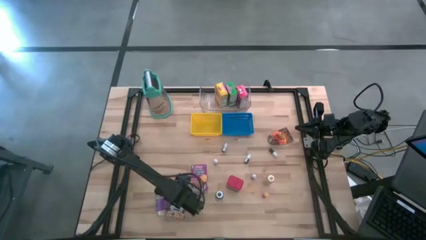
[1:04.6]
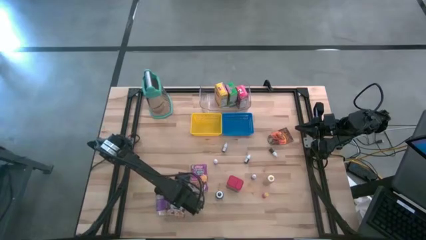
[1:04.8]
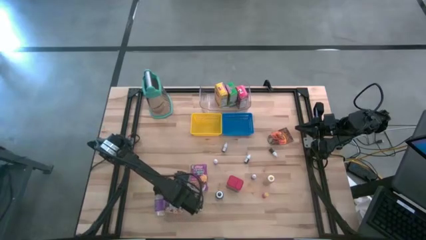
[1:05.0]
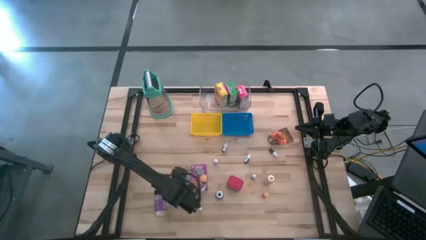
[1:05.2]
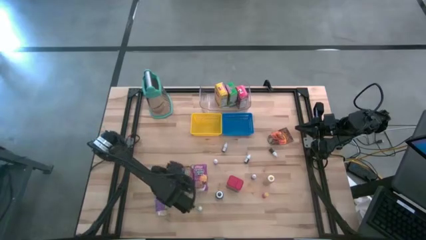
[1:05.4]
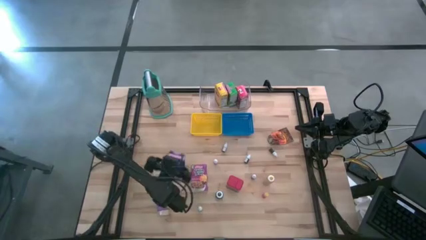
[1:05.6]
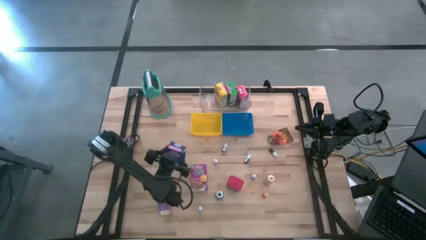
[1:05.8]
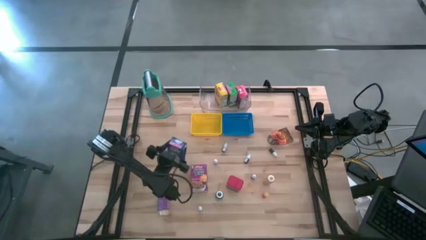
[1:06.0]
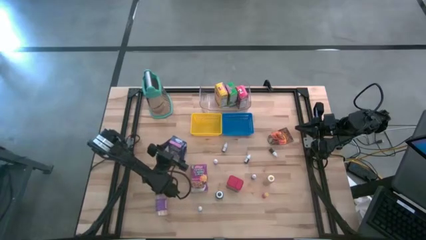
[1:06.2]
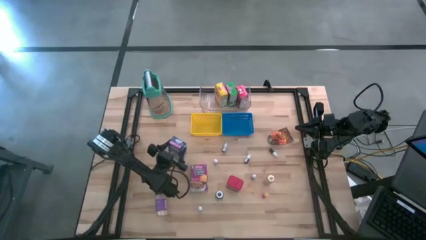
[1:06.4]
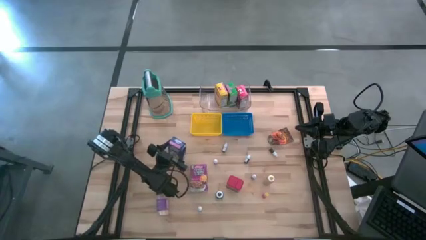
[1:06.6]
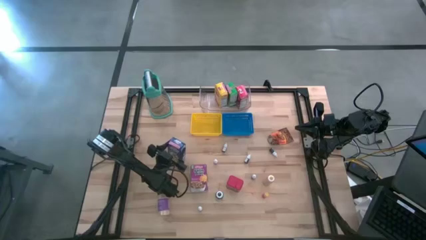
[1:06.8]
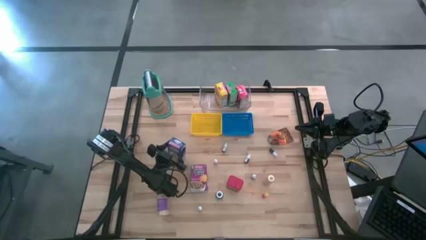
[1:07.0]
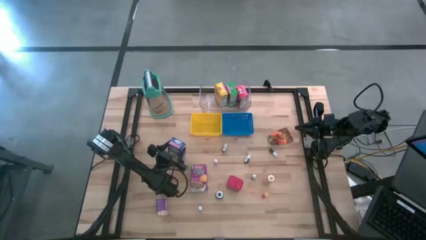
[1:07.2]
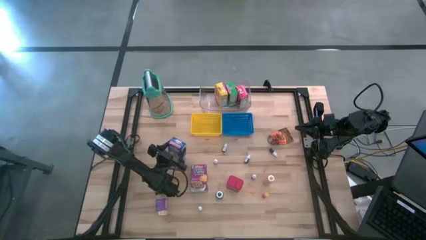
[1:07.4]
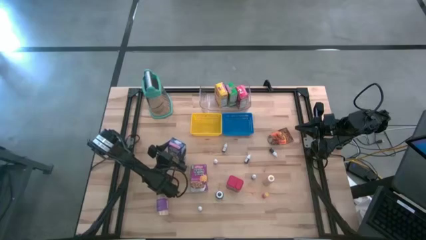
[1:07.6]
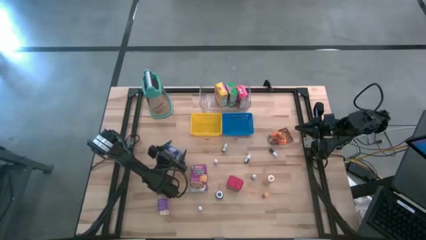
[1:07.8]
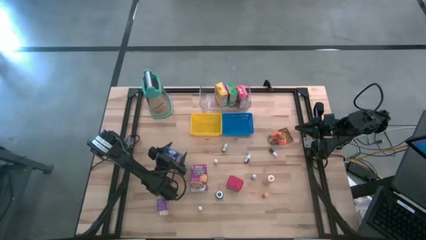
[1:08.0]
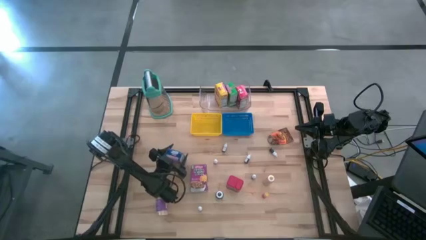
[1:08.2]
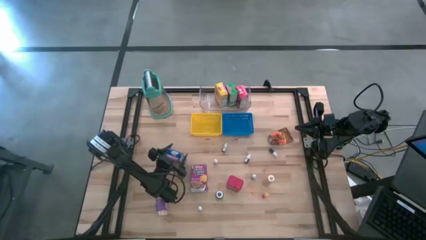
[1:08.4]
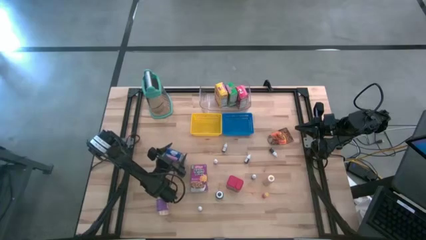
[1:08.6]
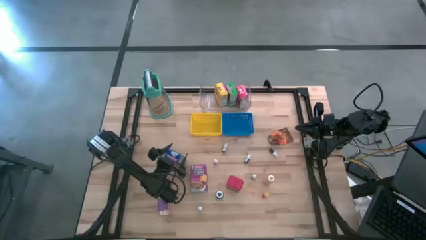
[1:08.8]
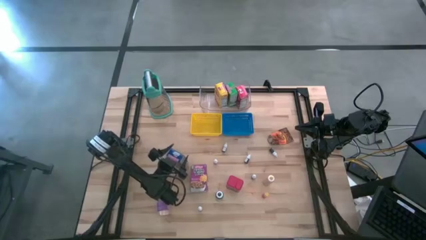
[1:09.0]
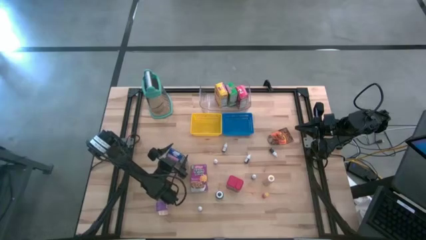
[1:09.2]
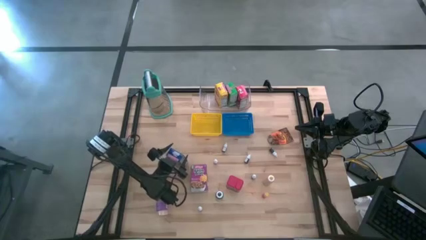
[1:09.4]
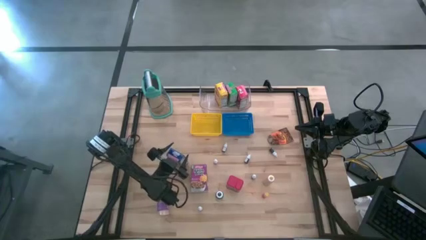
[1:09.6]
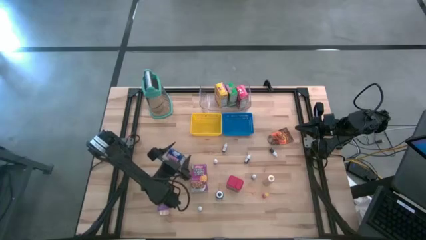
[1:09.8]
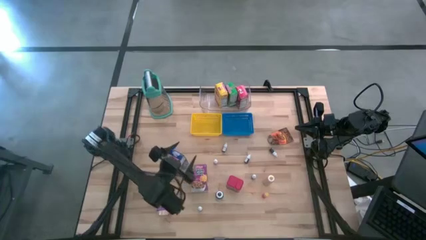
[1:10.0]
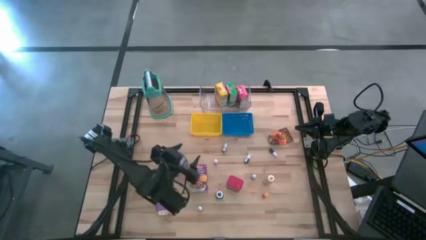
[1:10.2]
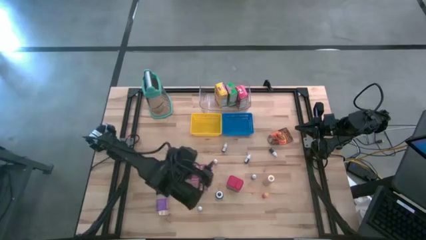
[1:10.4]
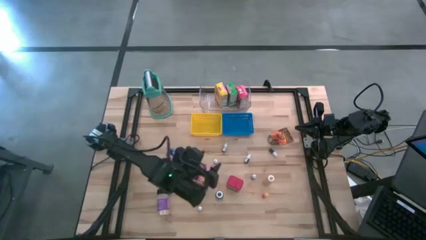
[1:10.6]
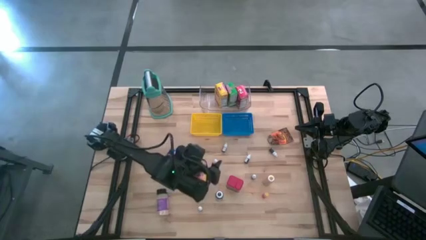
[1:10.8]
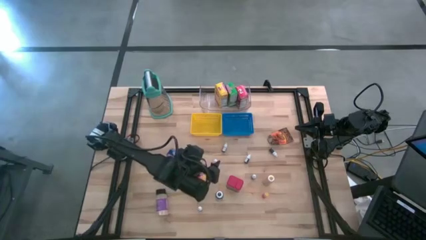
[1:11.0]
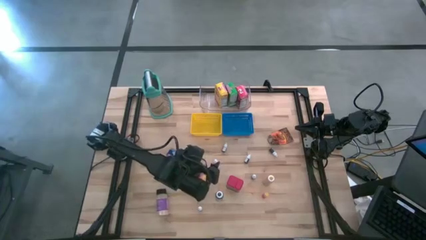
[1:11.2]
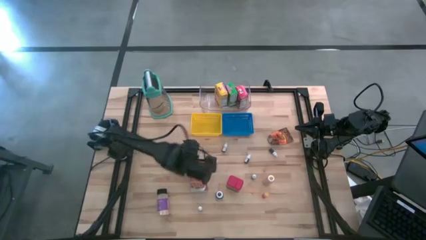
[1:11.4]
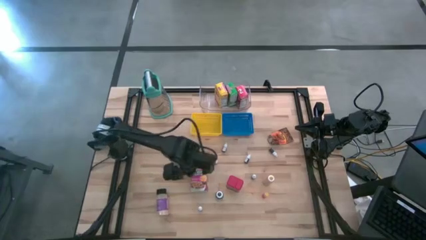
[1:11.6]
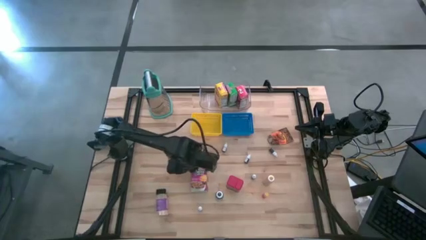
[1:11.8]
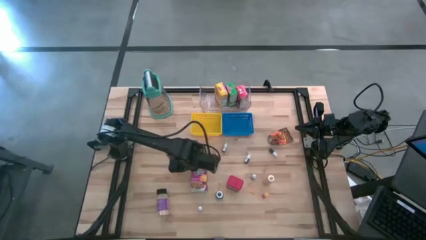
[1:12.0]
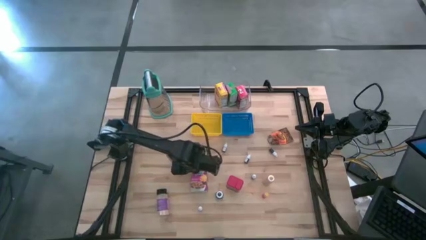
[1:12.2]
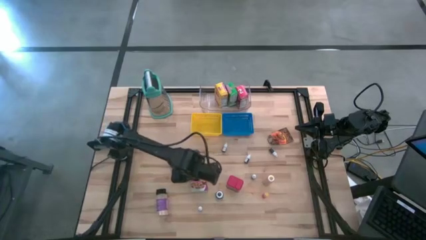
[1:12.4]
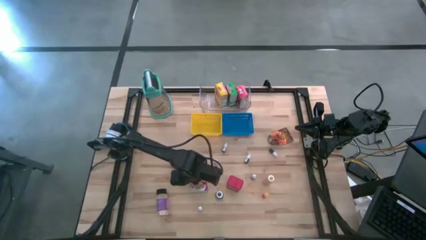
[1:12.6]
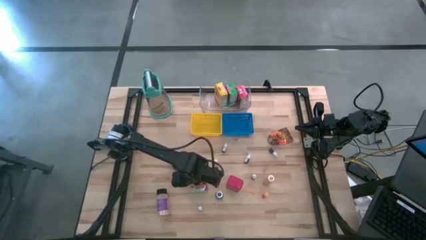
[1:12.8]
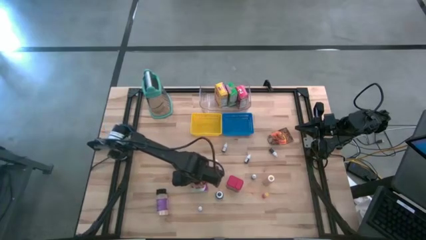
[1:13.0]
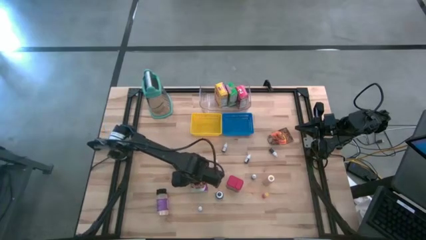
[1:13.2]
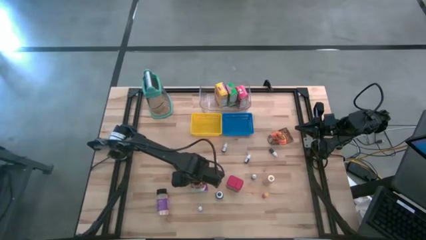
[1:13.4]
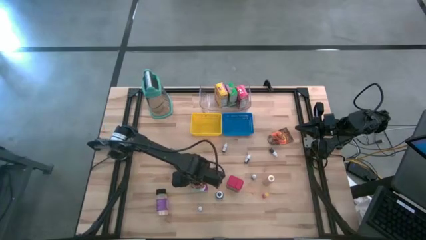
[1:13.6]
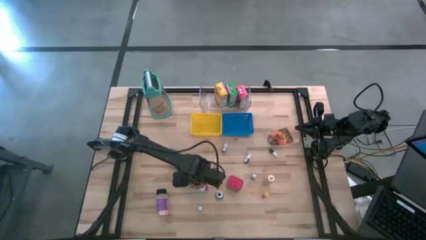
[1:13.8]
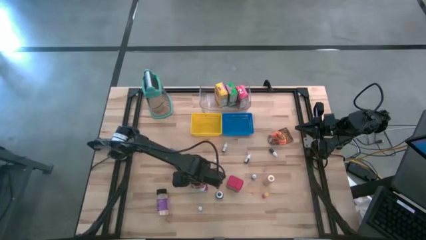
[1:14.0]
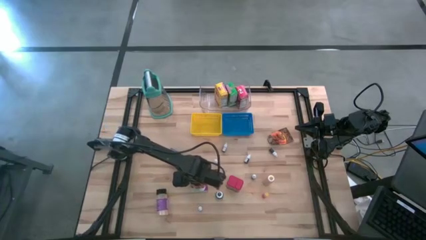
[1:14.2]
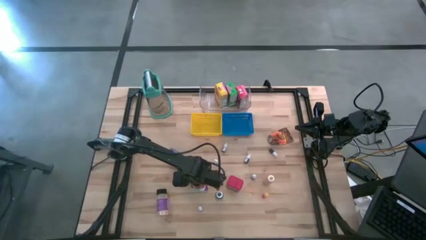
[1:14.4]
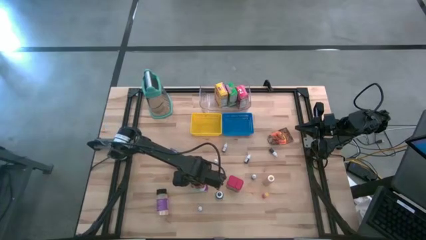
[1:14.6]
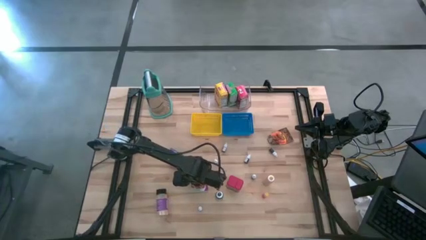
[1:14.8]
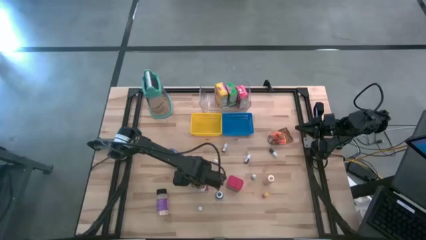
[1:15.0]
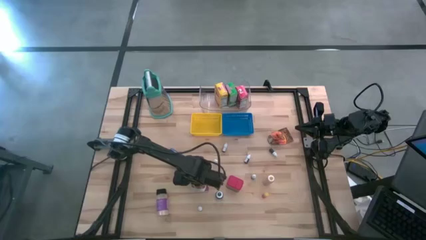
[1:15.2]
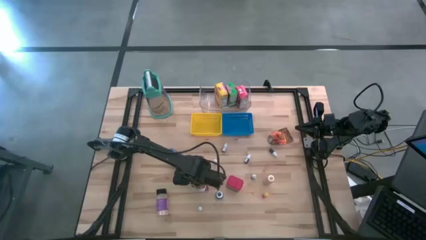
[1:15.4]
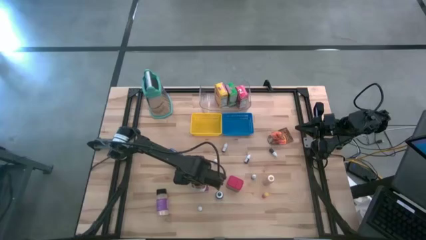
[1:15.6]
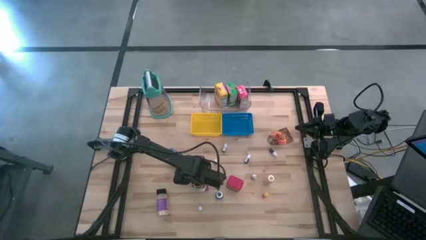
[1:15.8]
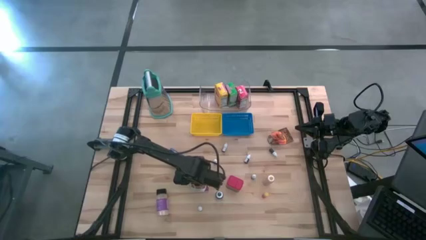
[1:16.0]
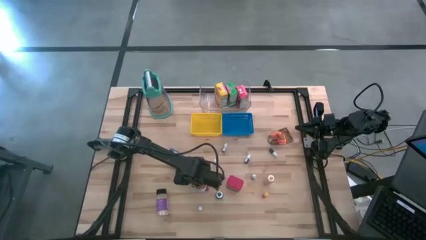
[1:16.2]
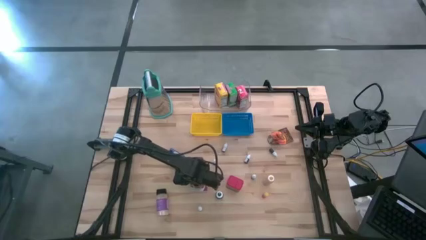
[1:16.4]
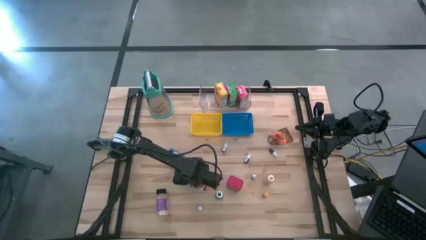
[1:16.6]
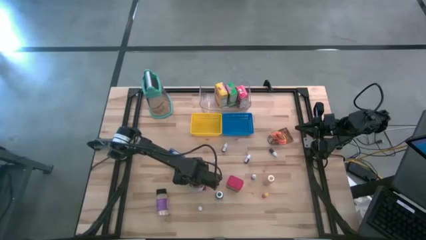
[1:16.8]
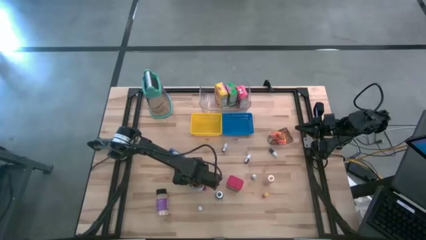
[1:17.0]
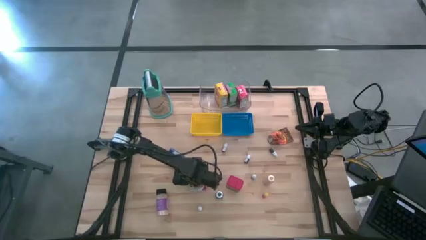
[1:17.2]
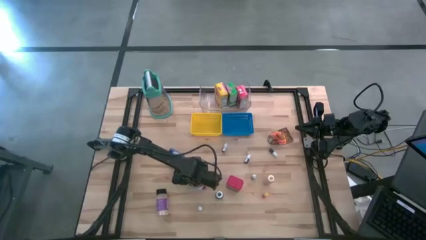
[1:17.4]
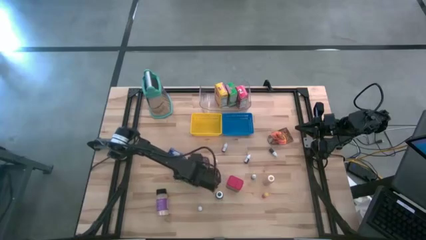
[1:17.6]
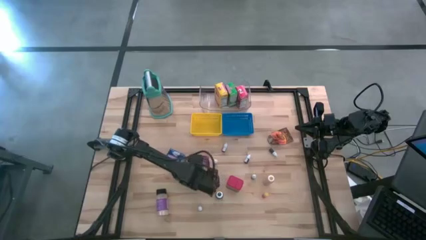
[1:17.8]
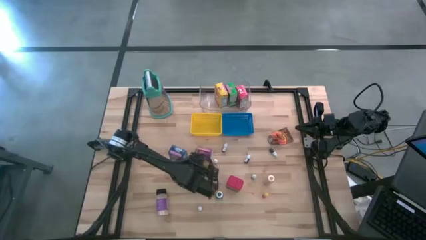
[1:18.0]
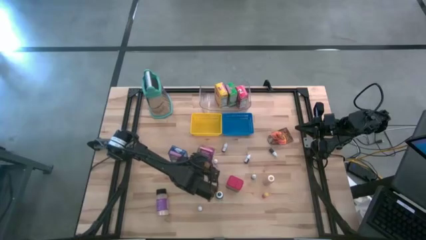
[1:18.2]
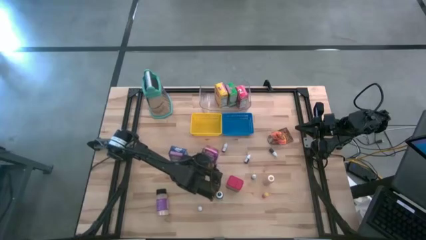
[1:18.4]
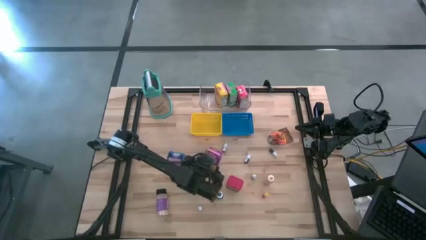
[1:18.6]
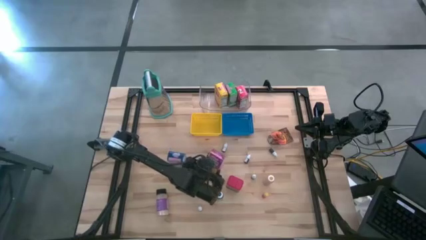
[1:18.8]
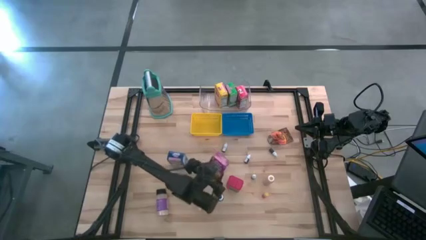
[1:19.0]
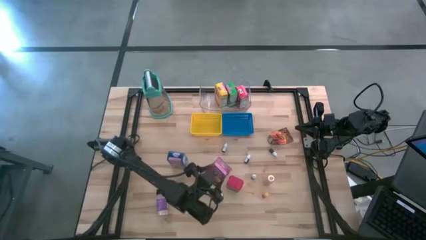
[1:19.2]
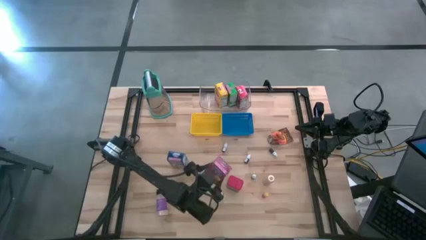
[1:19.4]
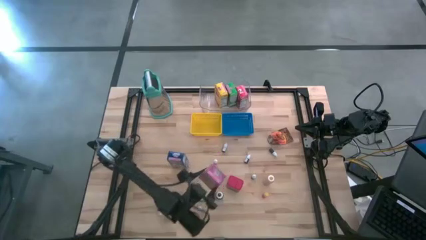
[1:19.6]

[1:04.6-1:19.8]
Task: Pick & Place Kitchen Items
Adjust the cereal boxes on the table
